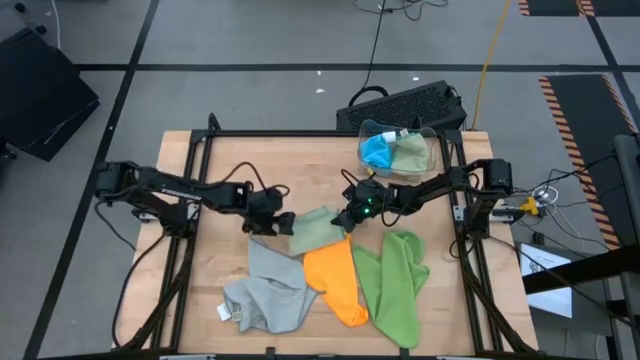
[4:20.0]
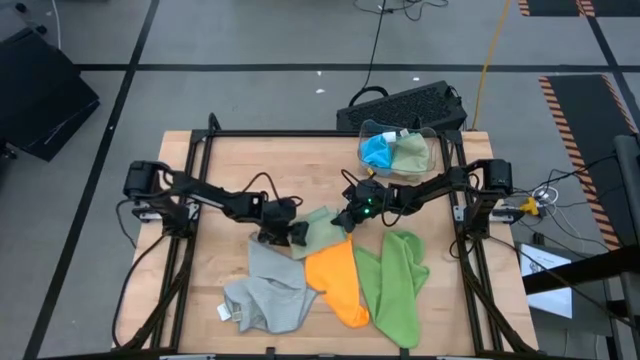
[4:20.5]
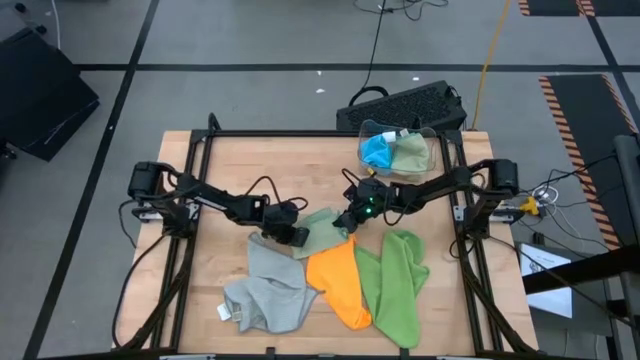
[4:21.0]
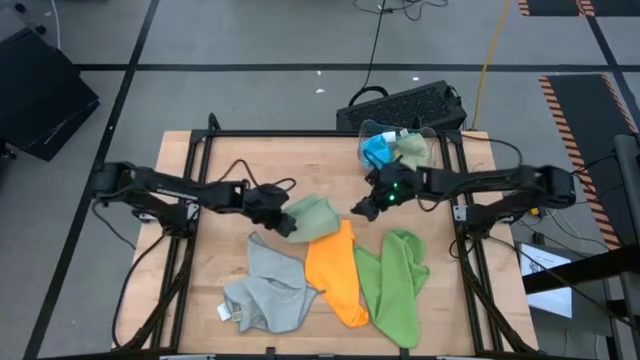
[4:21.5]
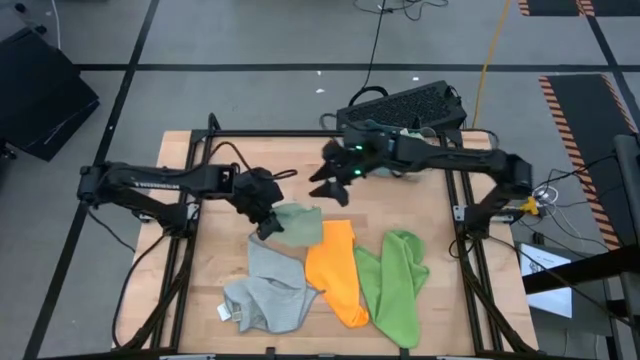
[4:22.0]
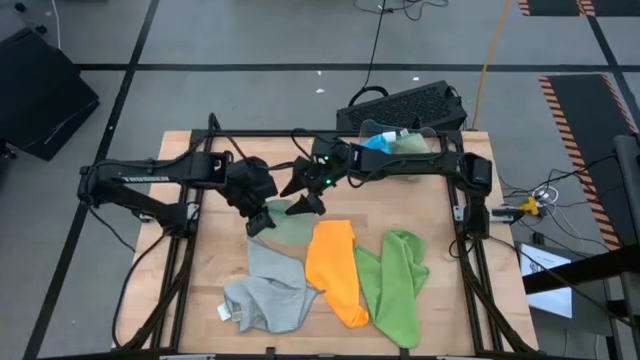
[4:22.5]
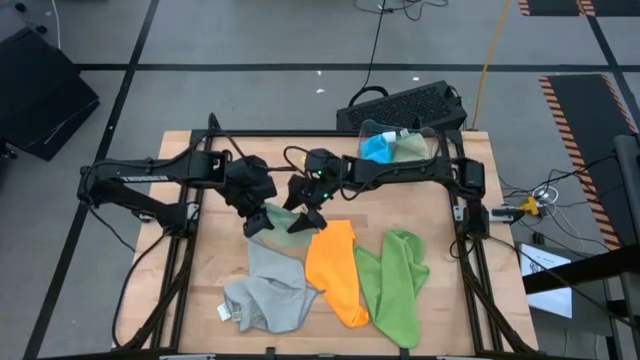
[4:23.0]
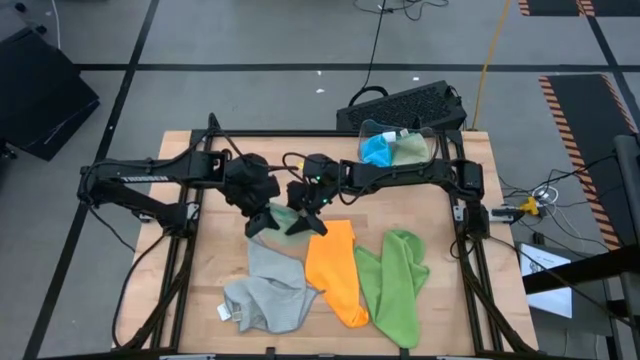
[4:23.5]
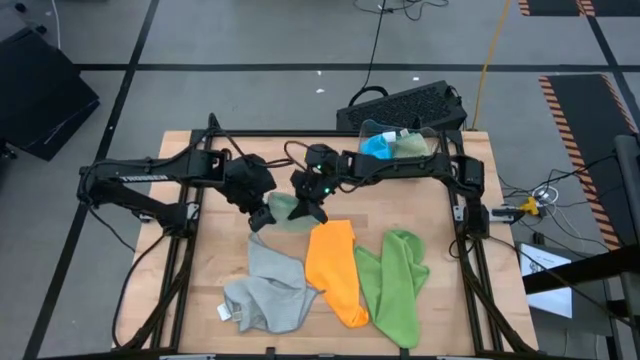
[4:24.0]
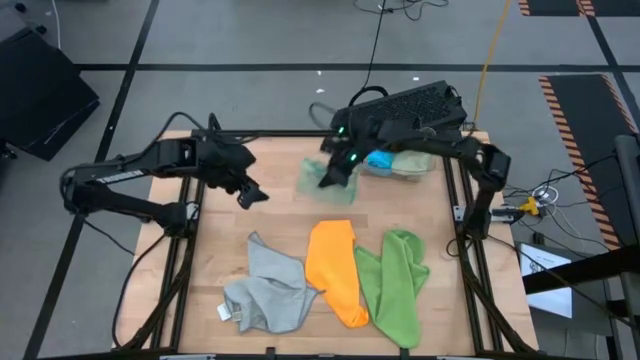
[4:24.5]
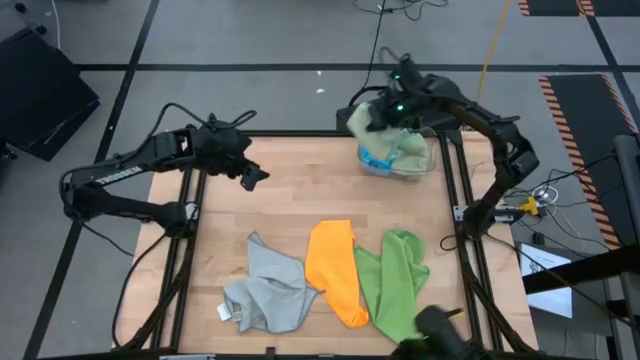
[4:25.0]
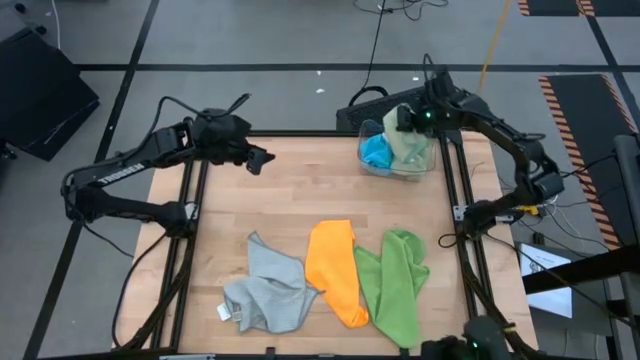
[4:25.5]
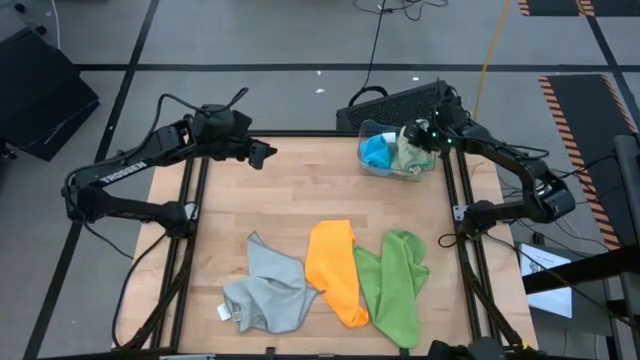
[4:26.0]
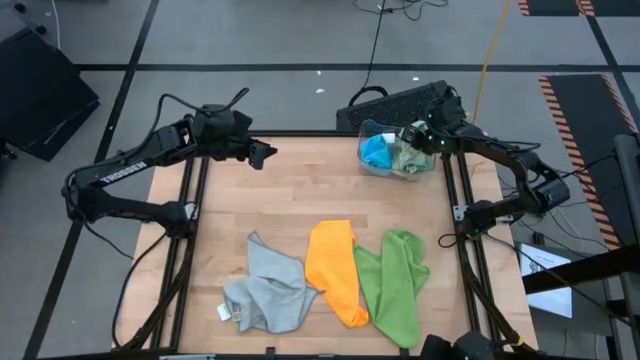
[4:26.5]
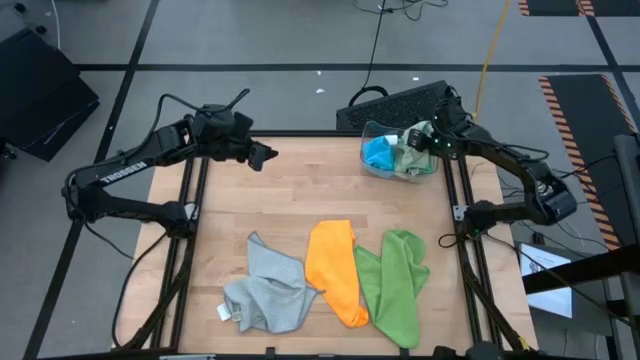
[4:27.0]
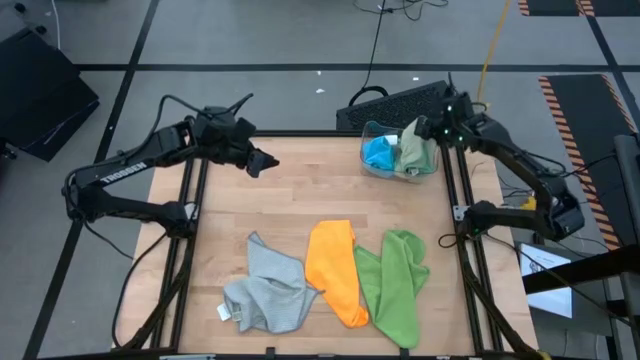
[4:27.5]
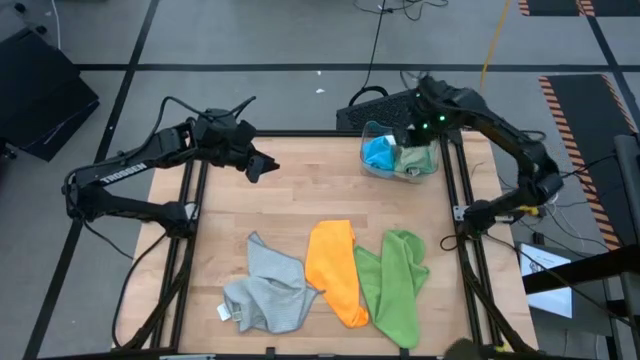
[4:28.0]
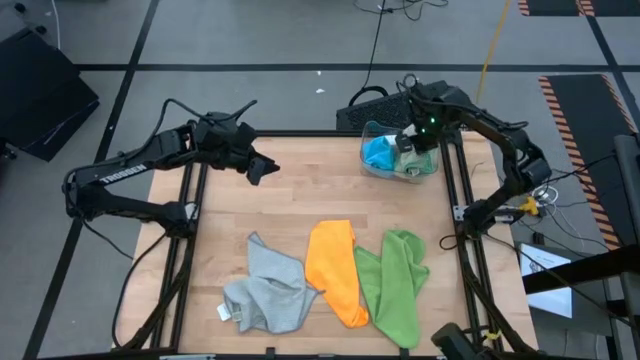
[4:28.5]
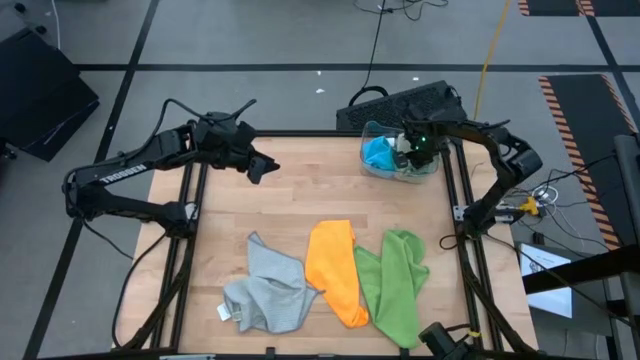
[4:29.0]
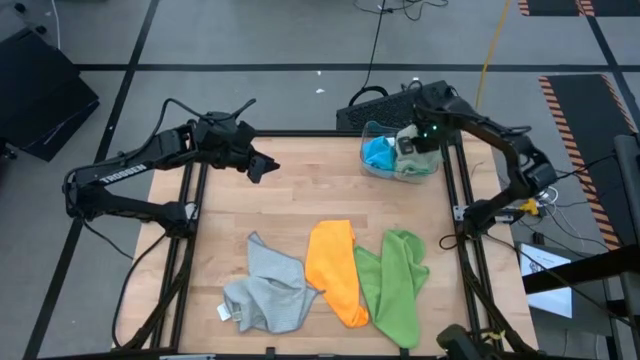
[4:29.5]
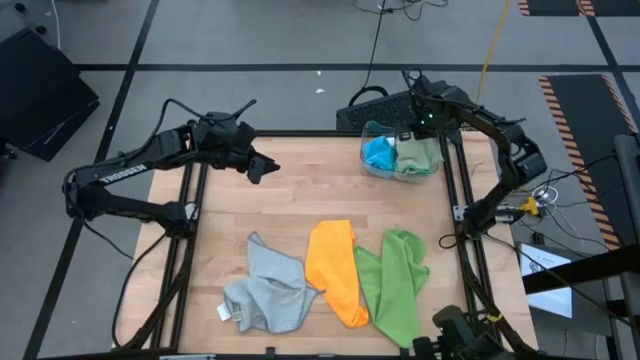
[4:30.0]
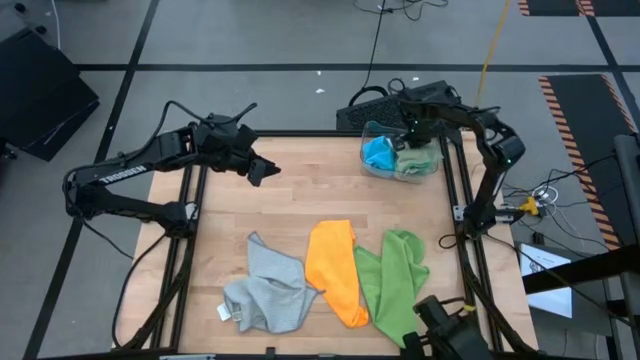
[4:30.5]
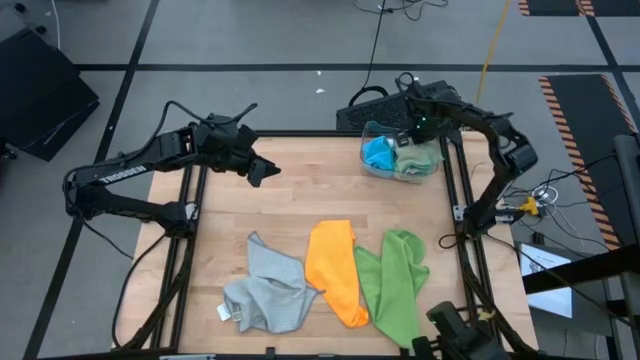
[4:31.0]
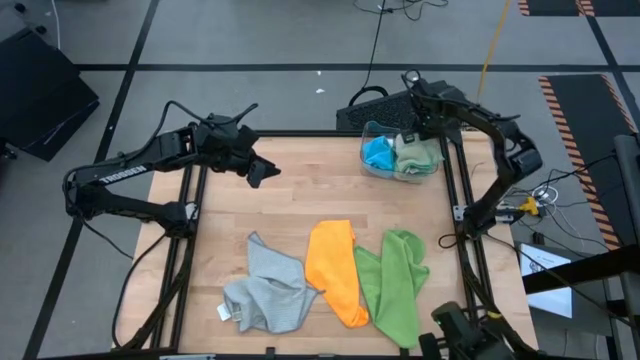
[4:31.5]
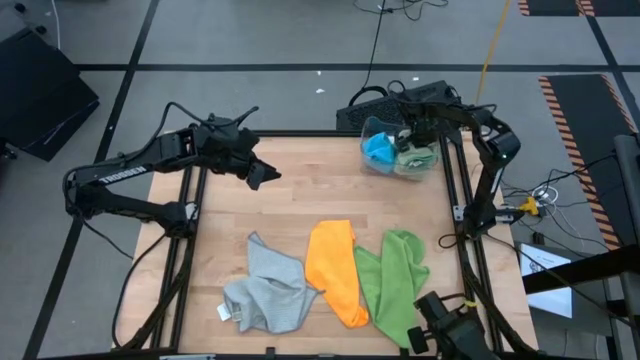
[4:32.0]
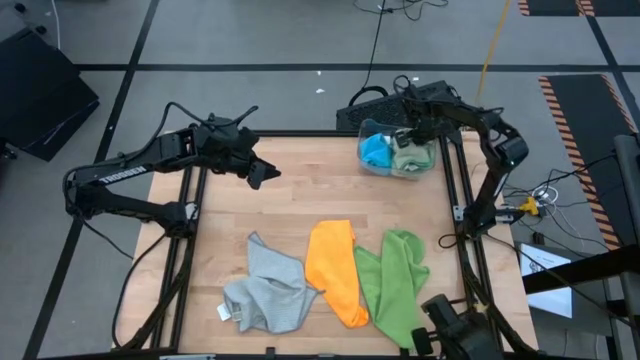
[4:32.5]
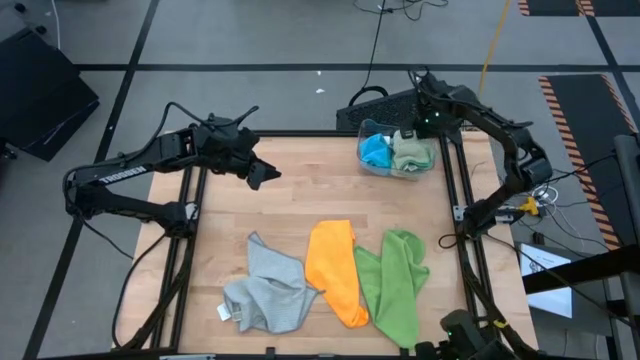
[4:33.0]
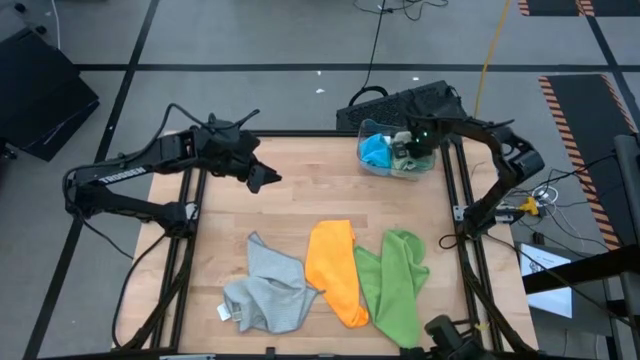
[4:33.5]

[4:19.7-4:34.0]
Task: Fold microfiber towels
Put the light green microfiber towel into the transparent bin
